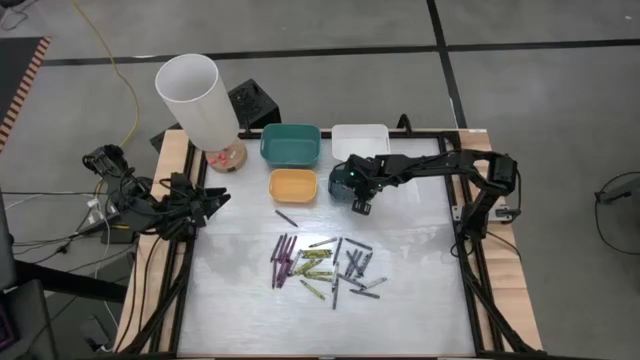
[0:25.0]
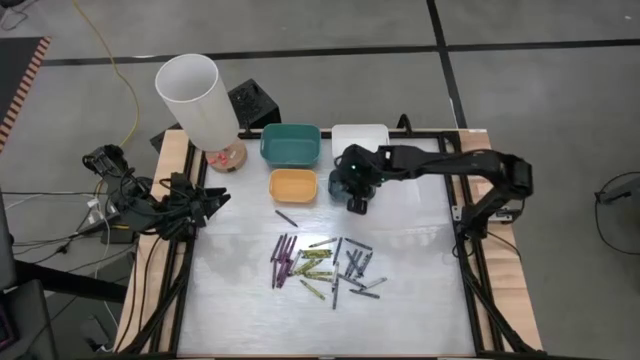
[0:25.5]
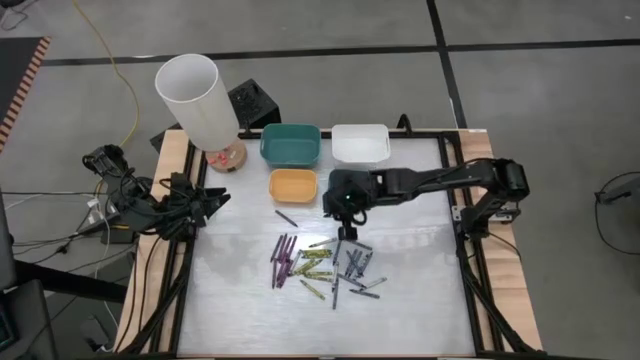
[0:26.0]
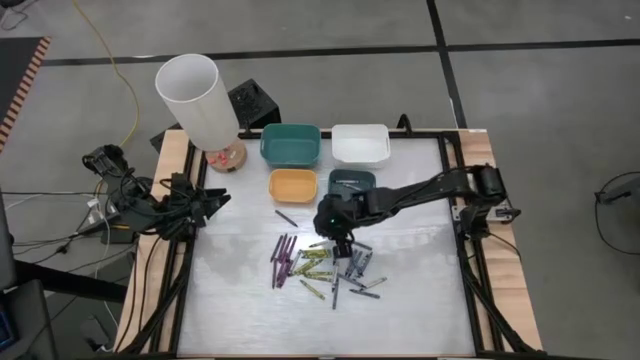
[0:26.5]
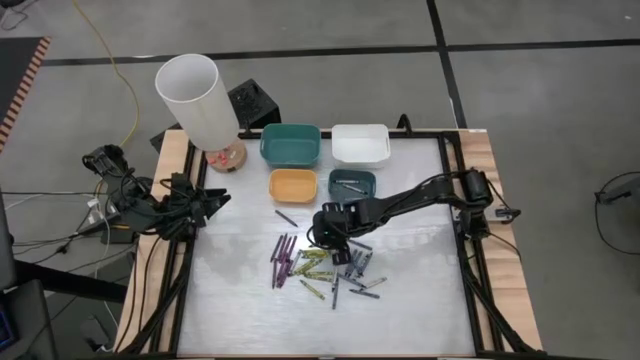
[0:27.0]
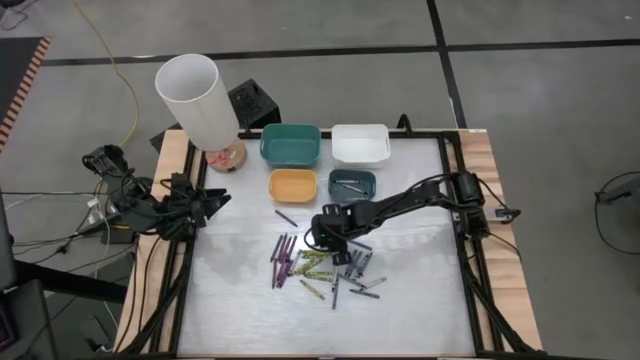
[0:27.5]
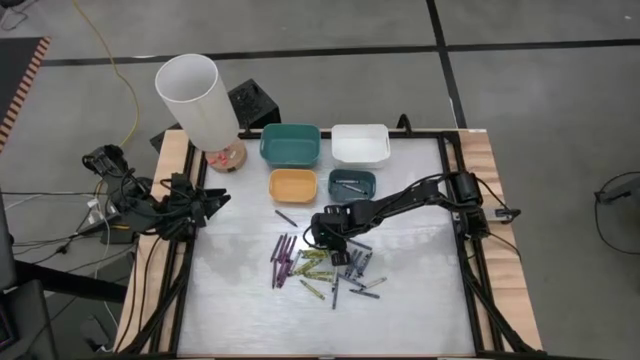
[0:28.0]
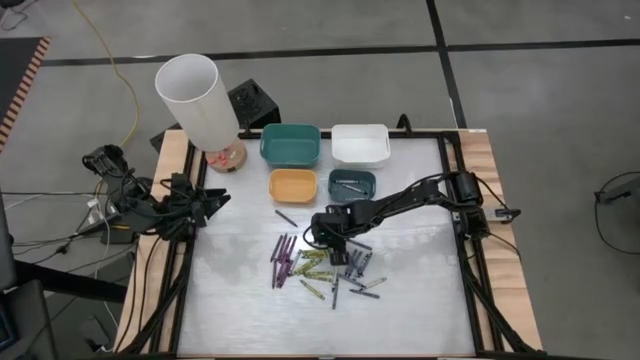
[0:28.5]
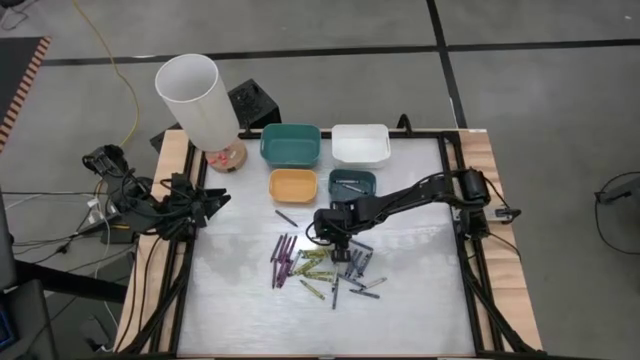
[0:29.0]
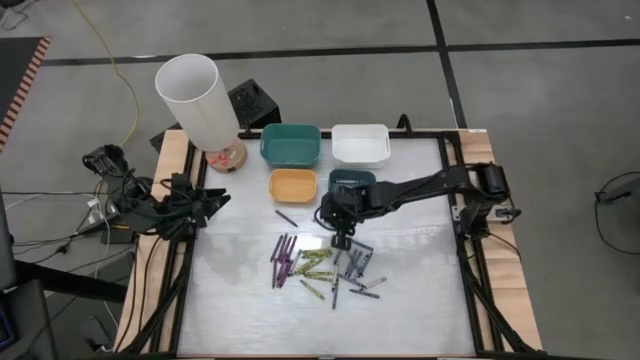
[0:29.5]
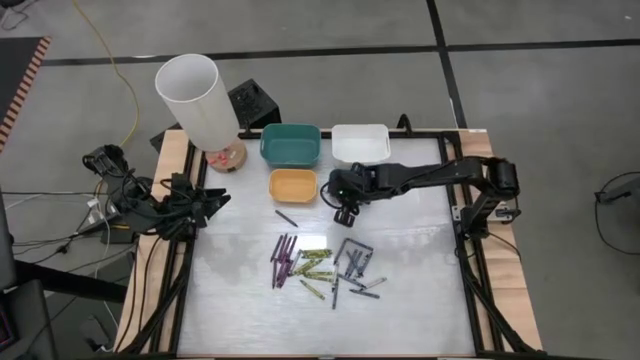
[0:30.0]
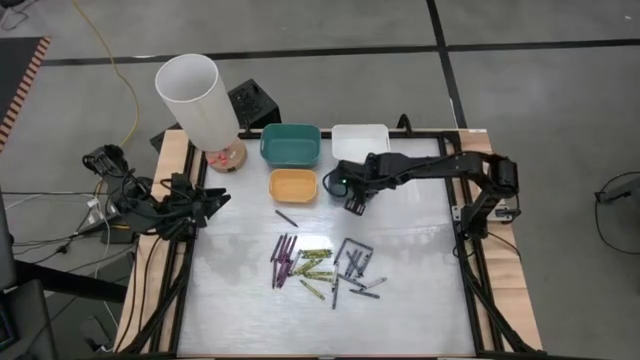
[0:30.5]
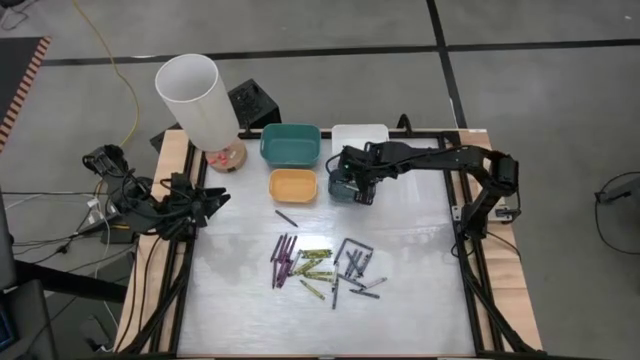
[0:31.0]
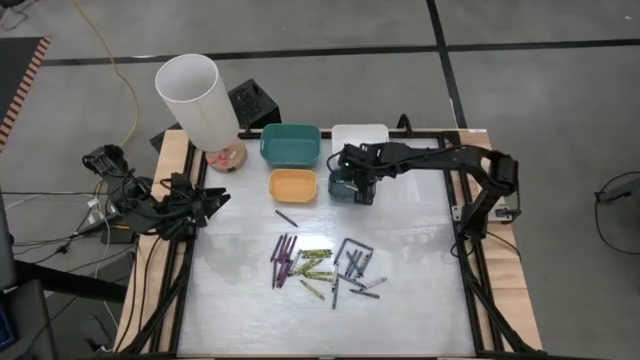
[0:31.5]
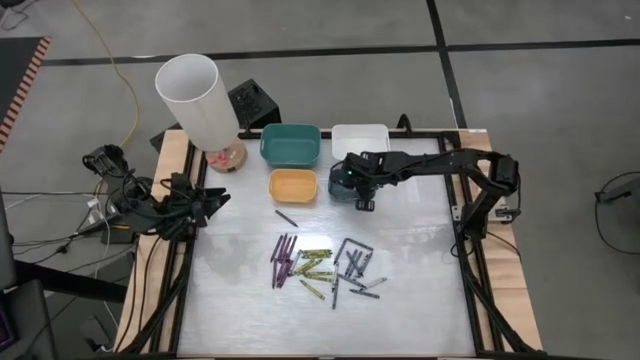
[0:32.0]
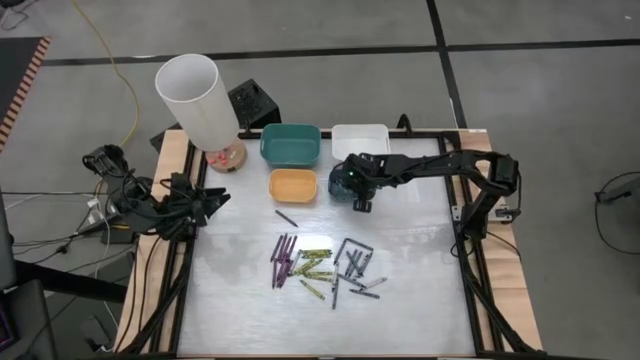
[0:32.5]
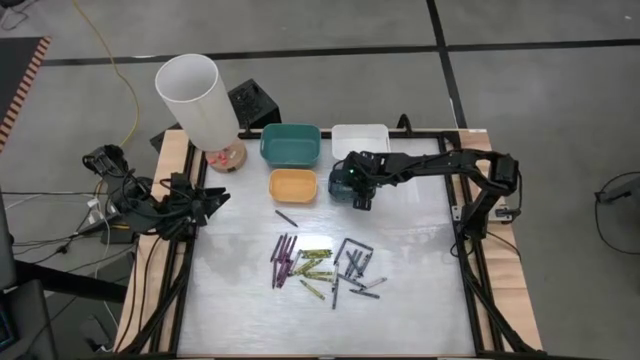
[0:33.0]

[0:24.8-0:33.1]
Task: Sort crayons
Put the black crayon into the blue bin

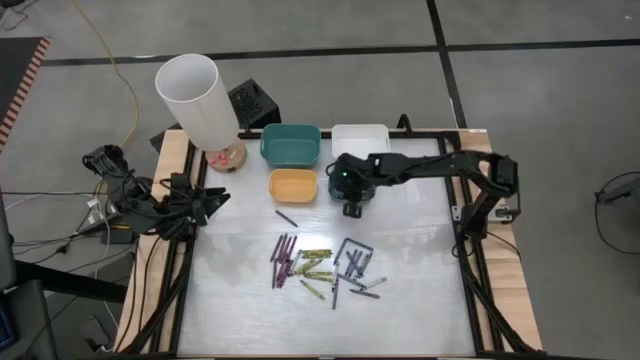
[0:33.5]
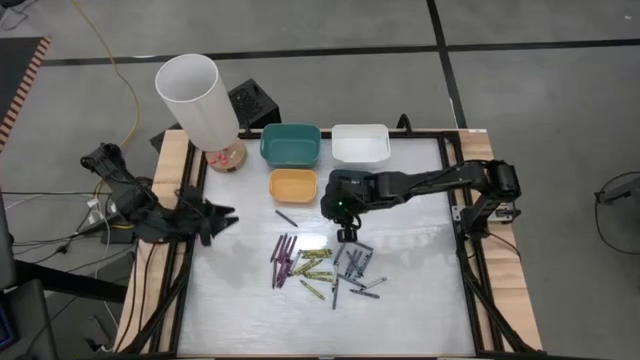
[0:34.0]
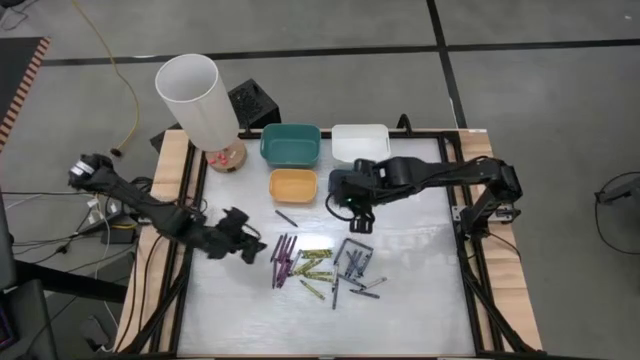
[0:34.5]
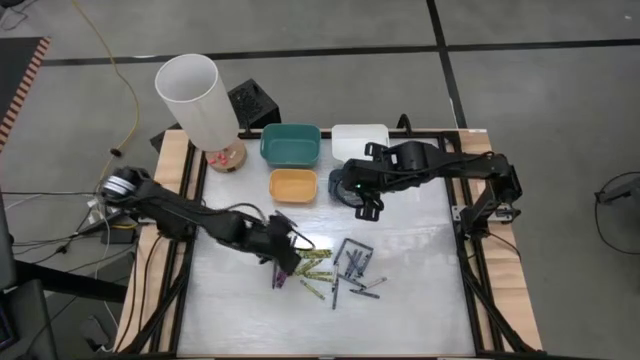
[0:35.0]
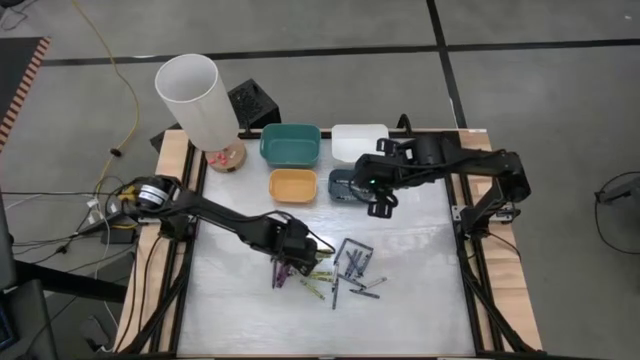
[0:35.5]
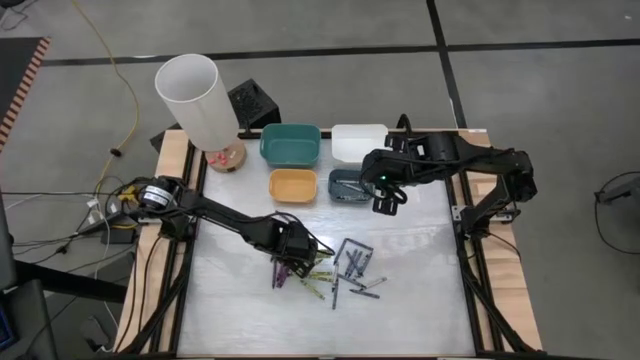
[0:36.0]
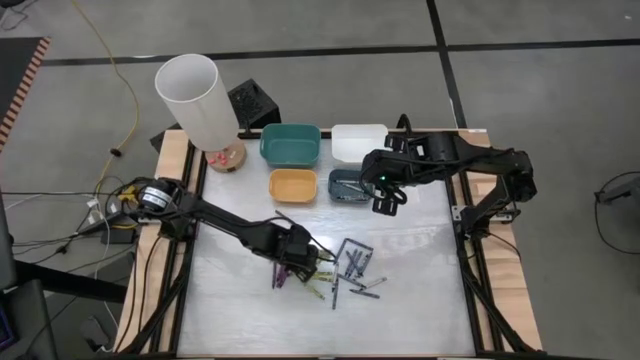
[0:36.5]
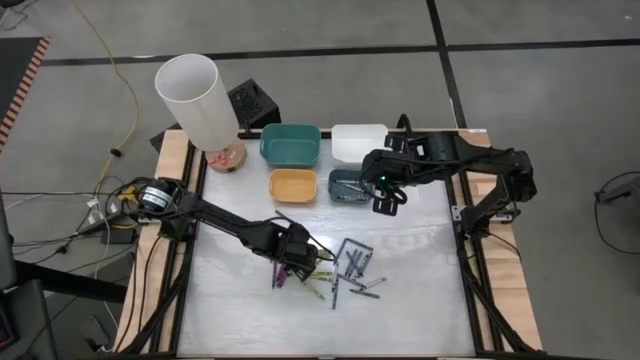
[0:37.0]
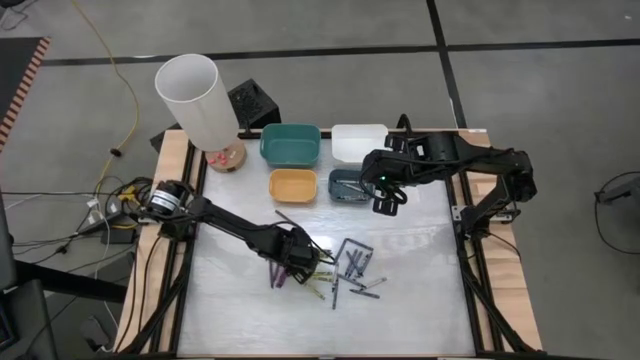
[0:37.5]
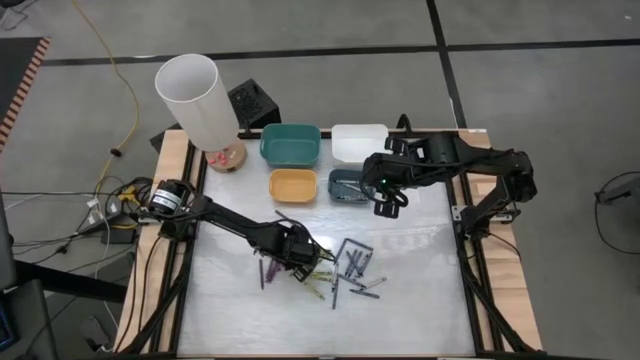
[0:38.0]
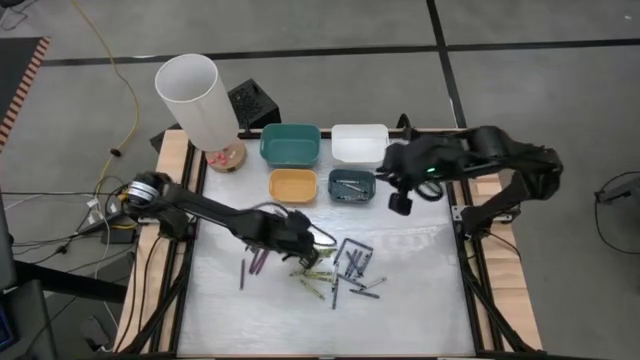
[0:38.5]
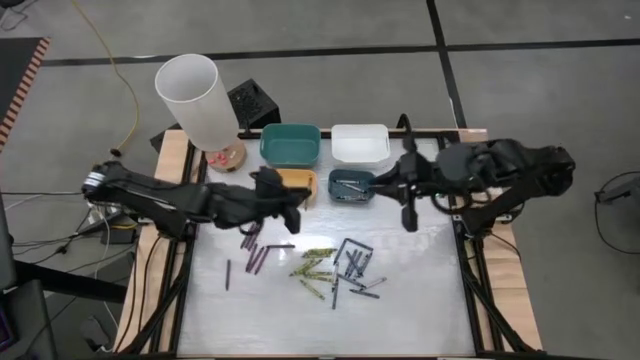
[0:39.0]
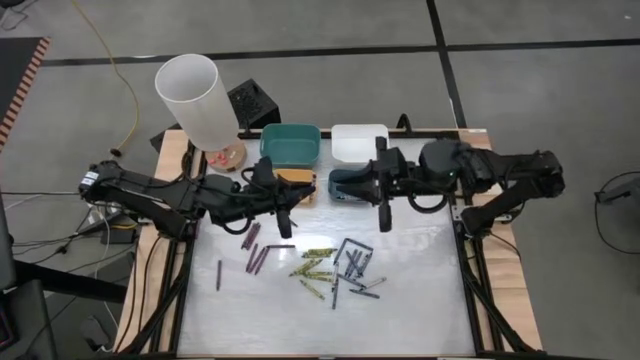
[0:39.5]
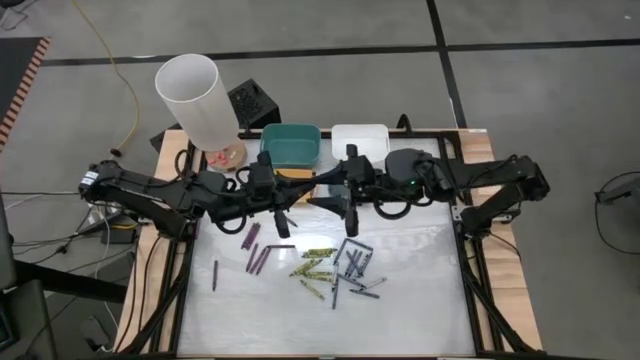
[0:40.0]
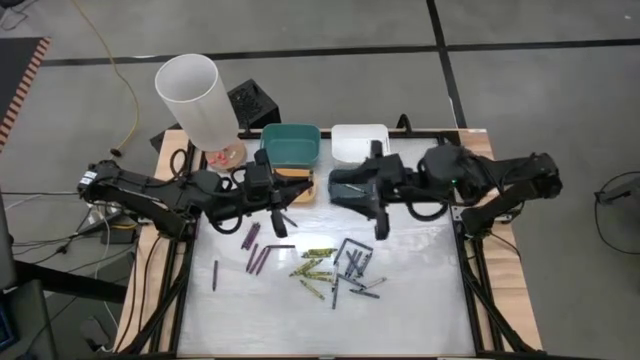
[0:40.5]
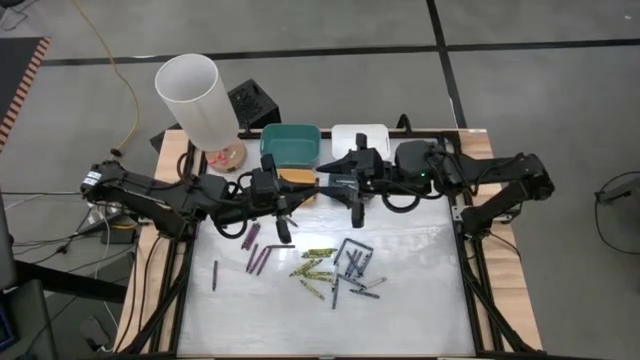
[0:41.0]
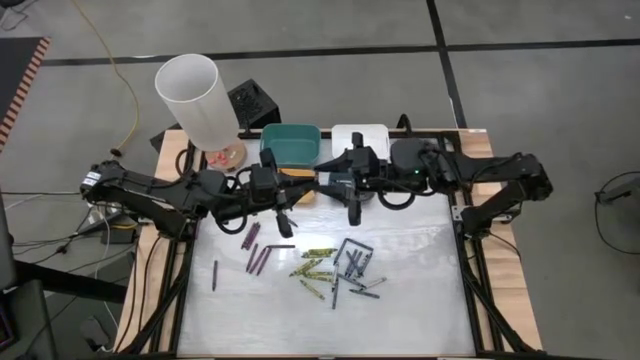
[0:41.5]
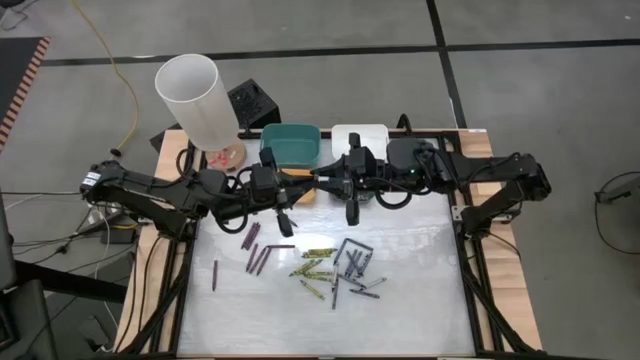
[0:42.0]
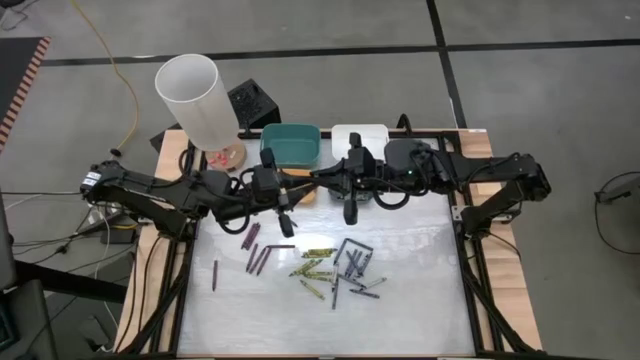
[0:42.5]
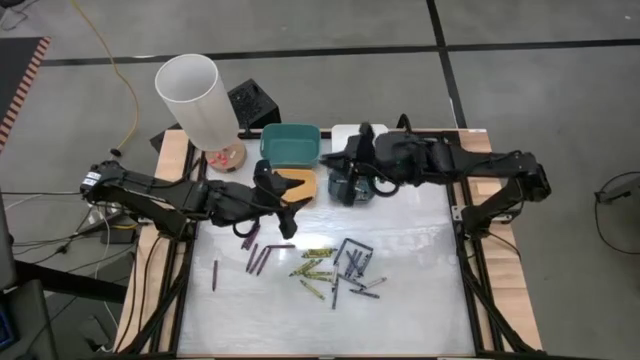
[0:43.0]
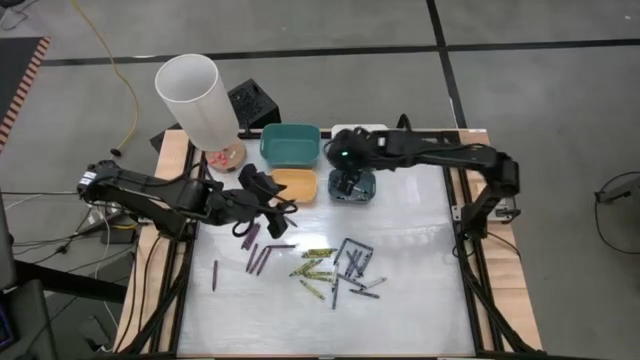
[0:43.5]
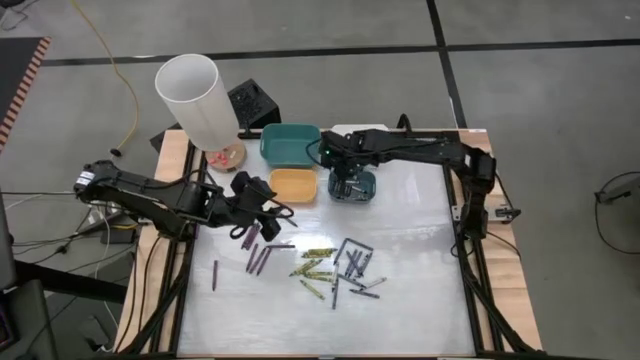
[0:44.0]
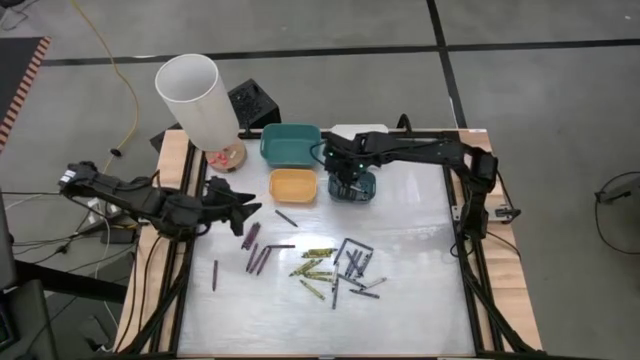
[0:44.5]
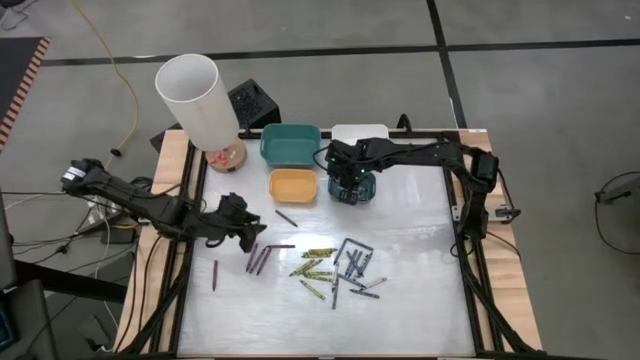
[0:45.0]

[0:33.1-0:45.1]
Put the black crayon into the blue bin

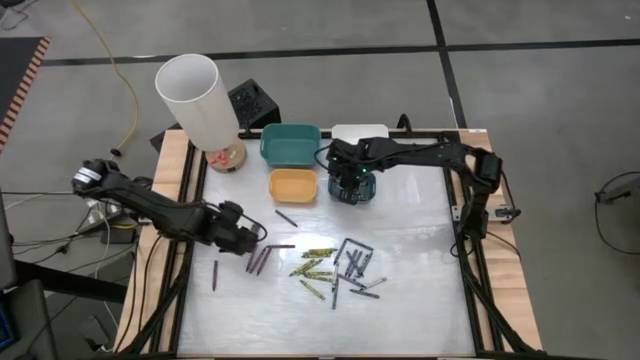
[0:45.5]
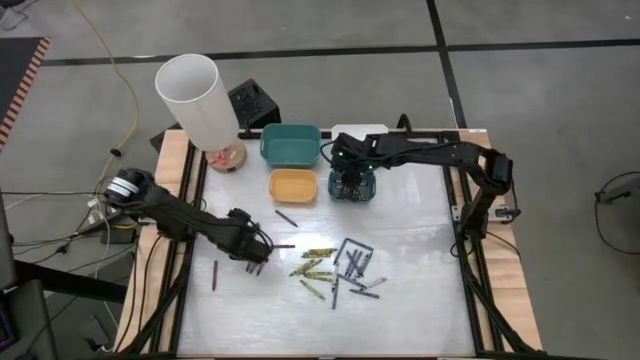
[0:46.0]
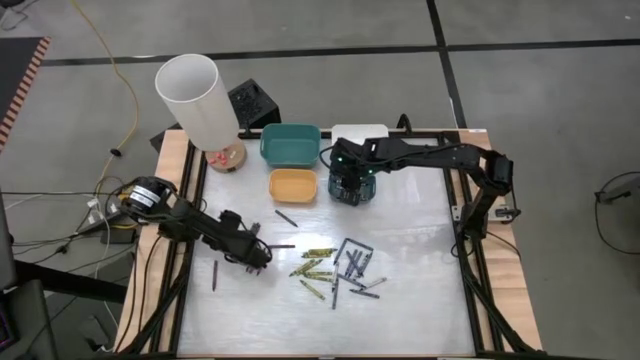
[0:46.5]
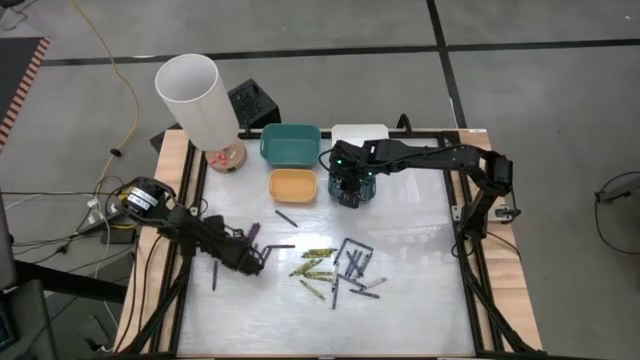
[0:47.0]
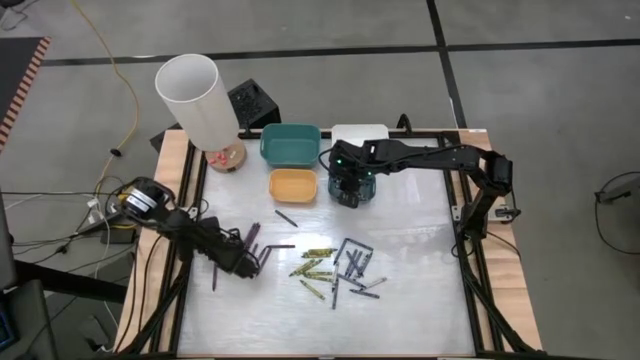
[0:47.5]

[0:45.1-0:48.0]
Put the violet crayon into the green bin
